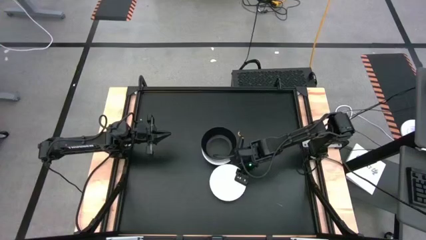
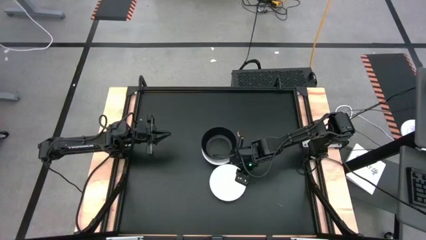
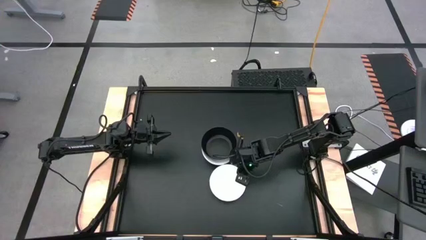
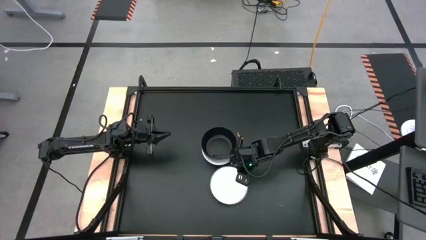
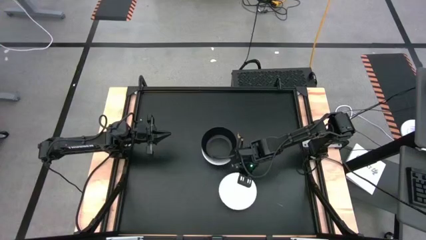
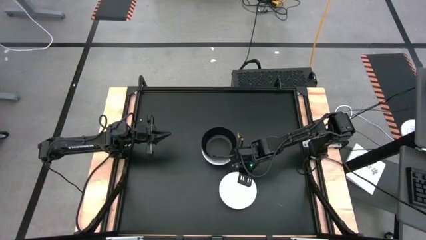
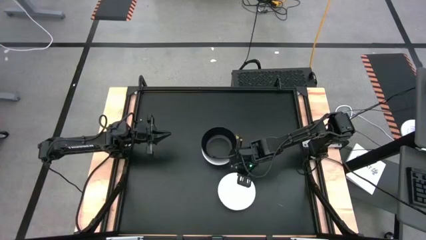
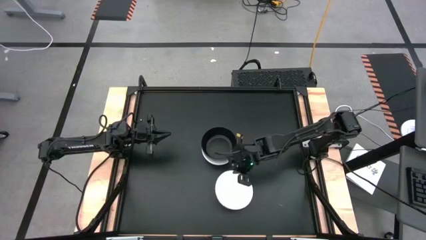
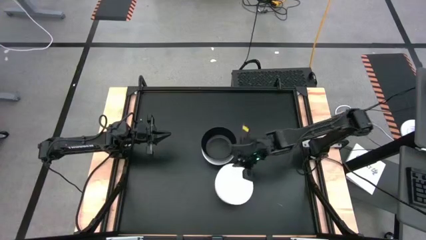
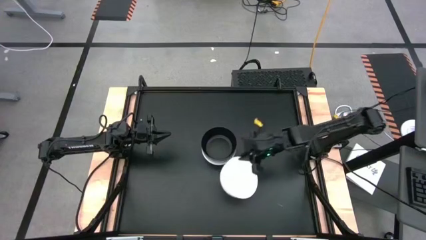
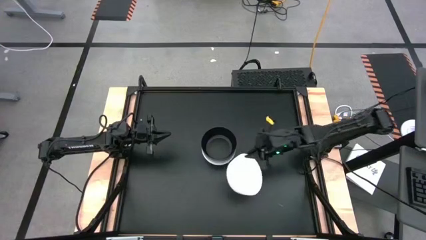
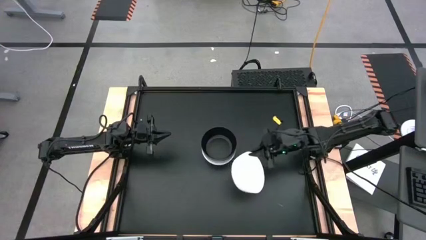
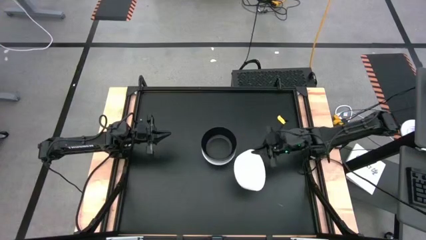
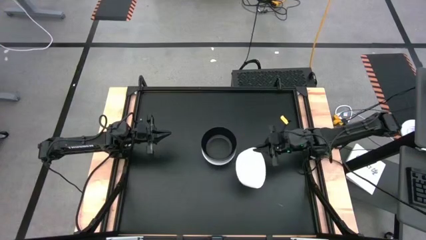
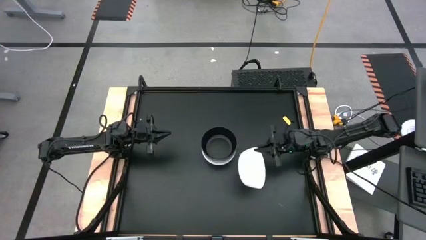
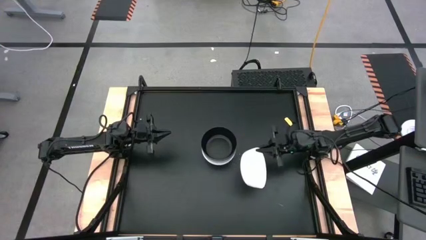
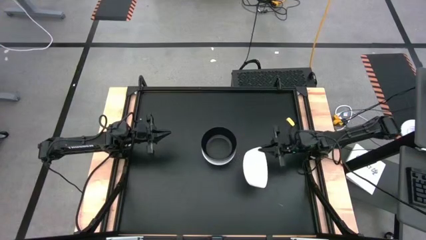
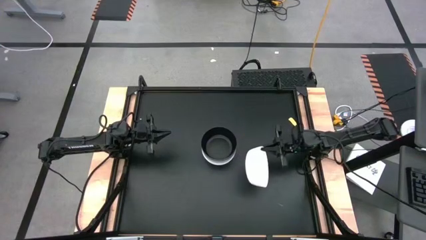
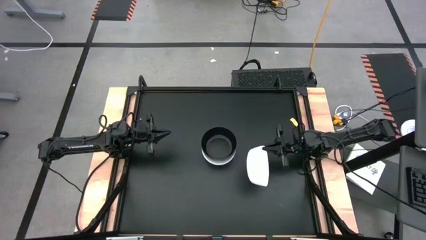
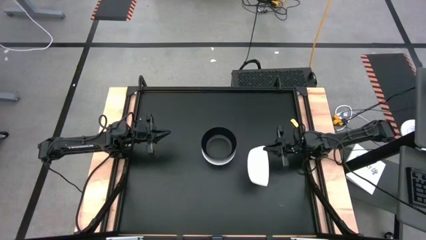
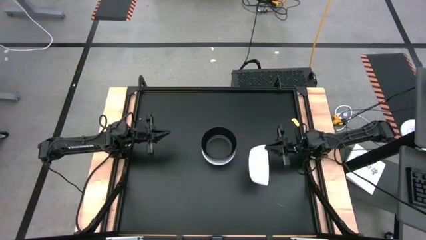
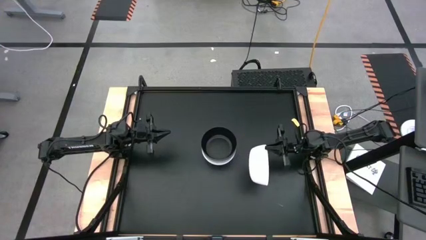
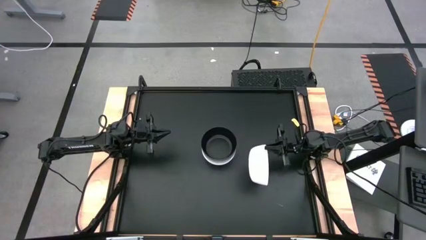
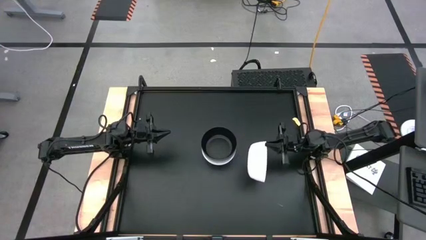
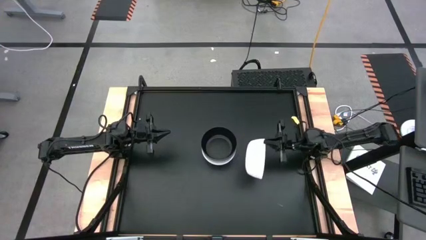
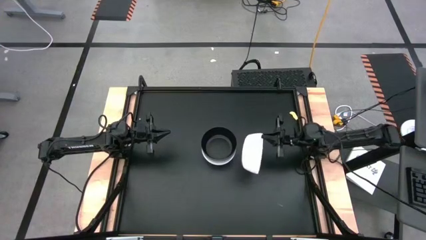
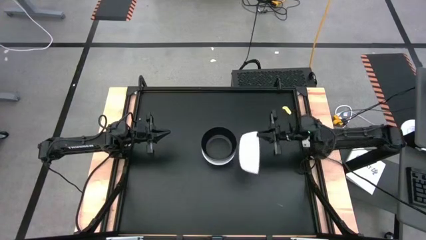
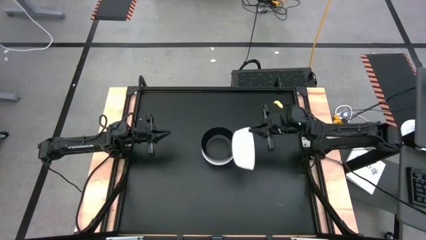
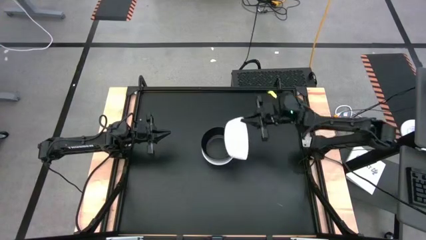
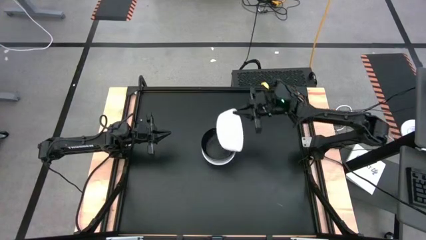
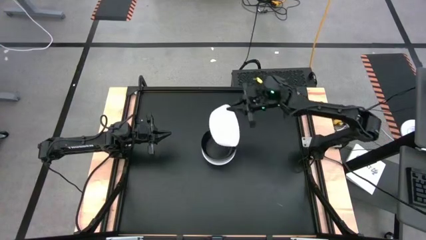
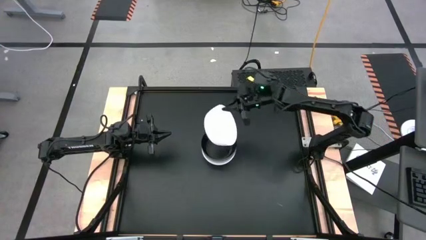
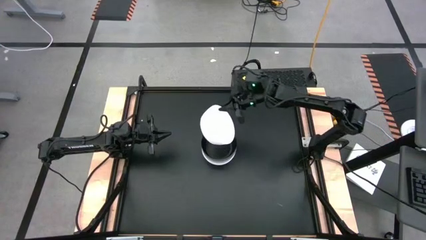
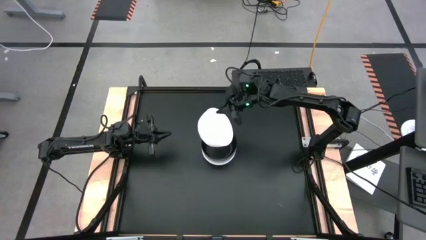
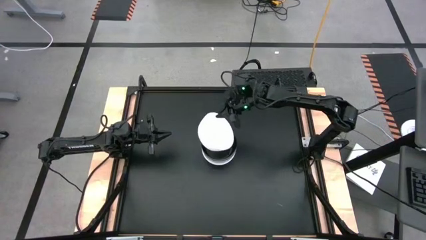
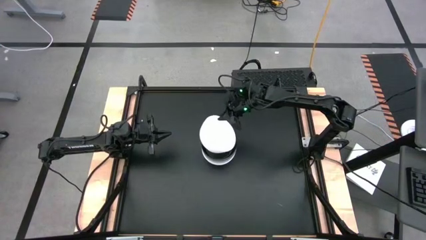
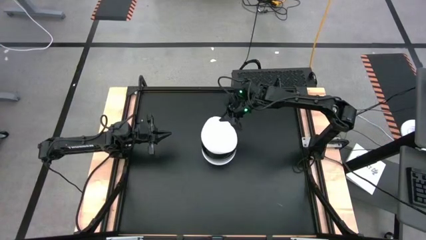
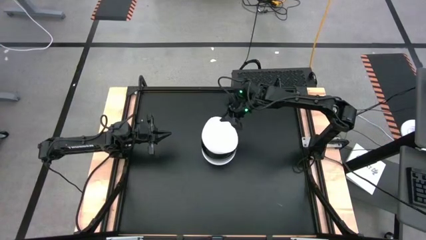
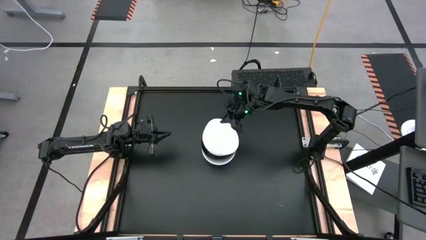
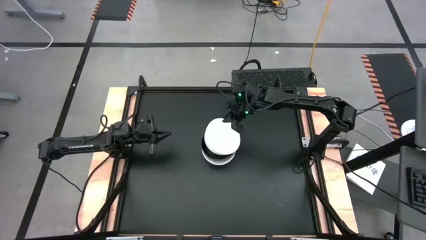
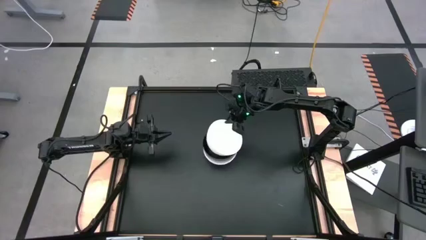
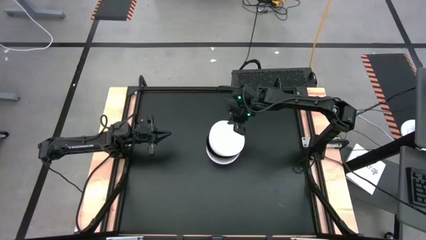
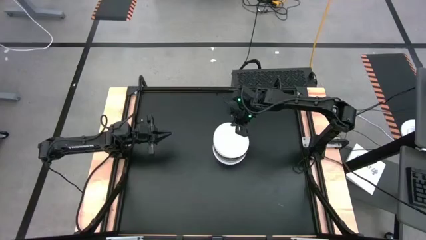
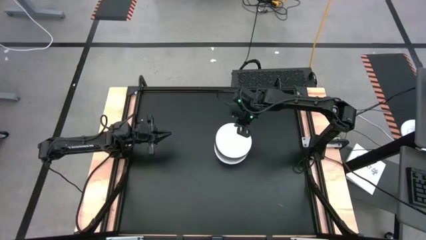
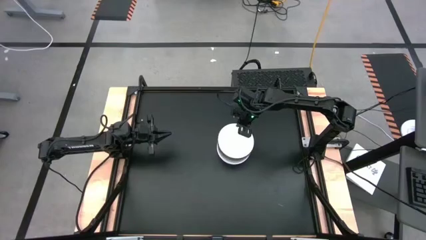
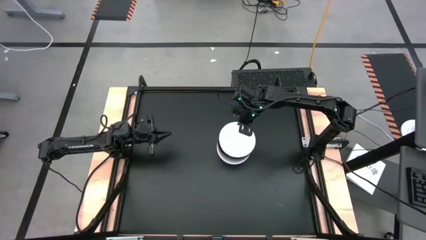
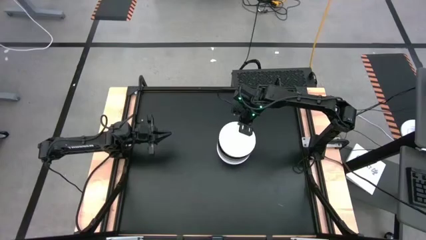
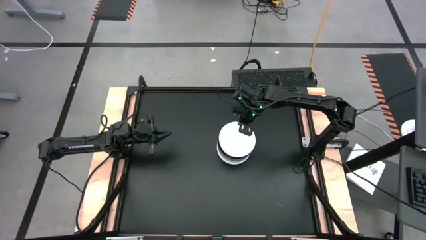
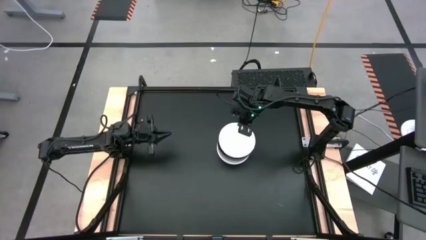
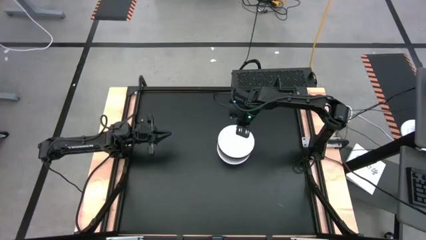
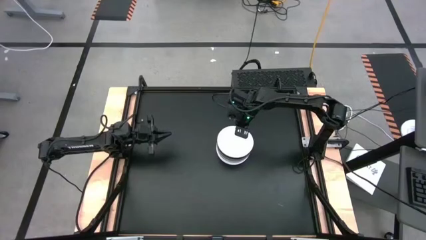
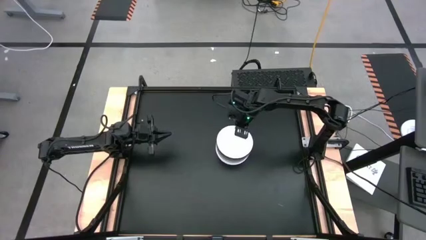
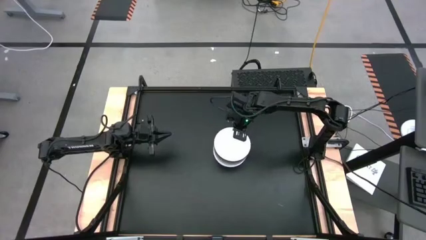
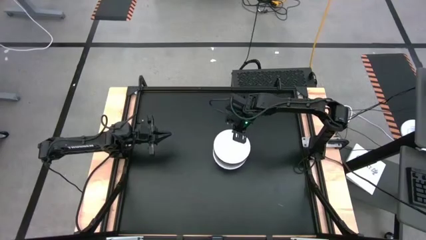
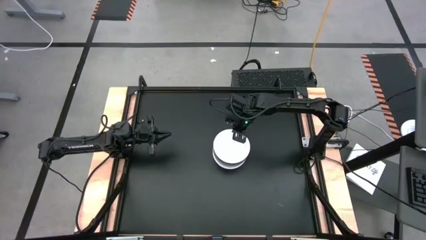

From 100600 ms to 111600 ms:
Task: Nest bowls inside each other
Stack the white bowl on top of the black bowl

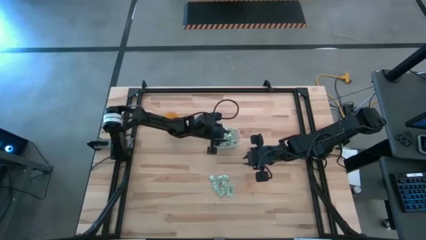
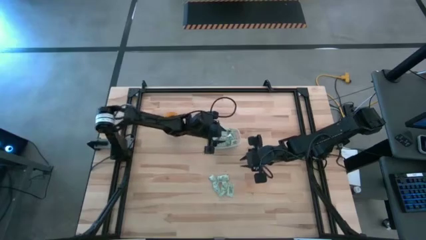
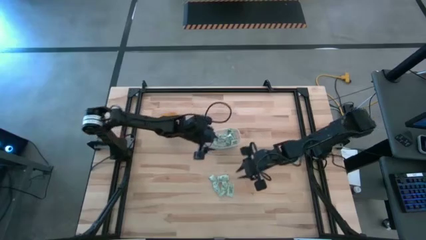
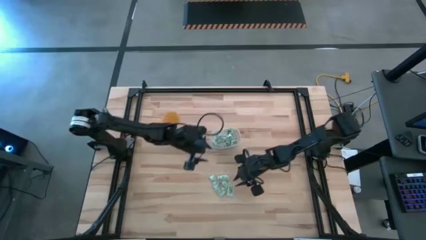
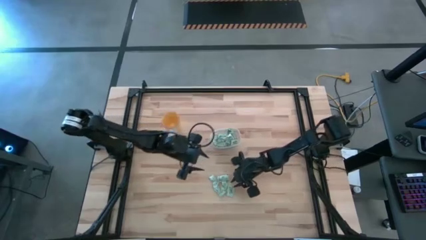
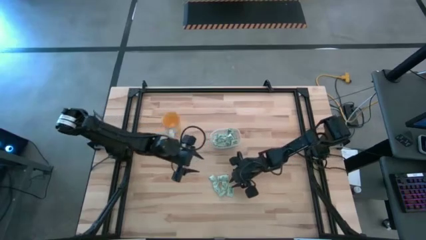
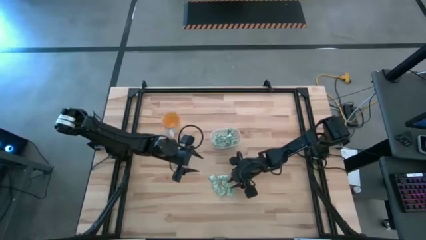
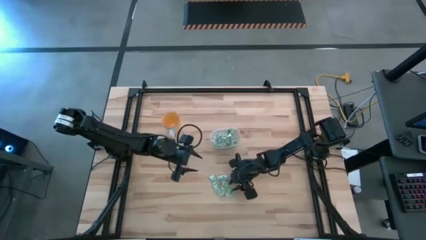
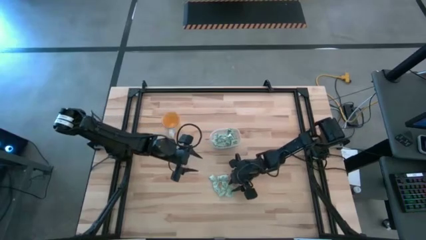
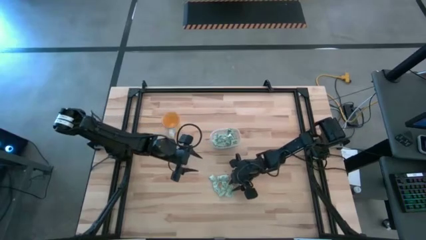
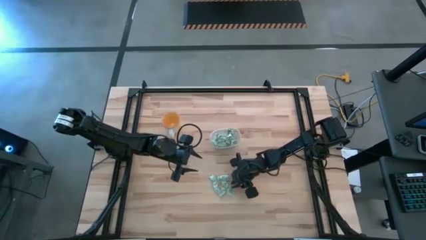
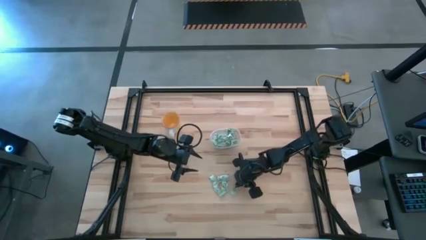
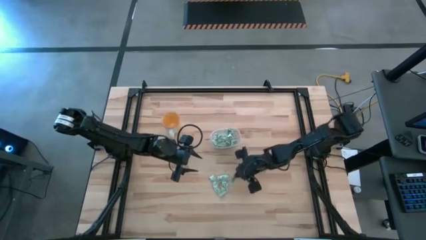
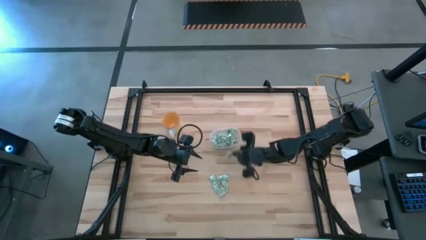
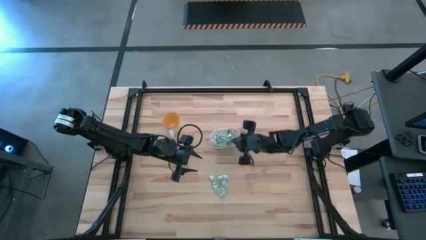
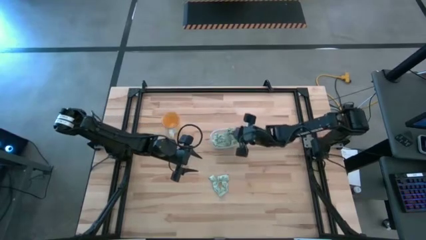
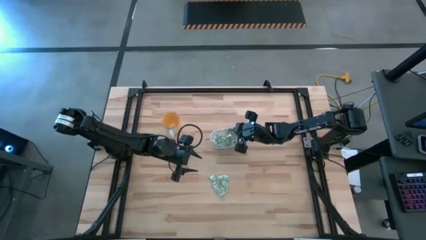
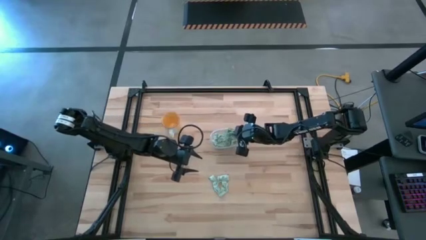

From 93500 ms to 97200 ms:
Task: Pick and place Stevia / Truvia into bins
Put the stevia packet into the transparent bin

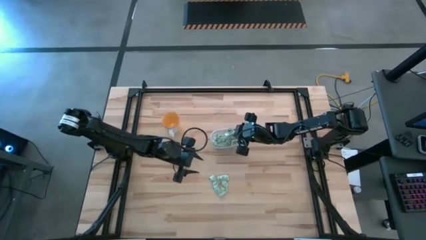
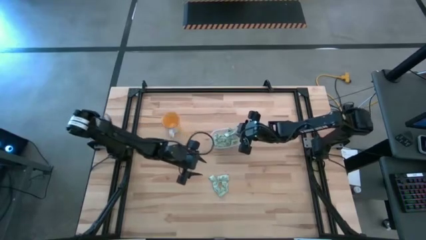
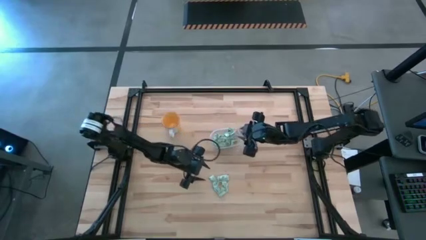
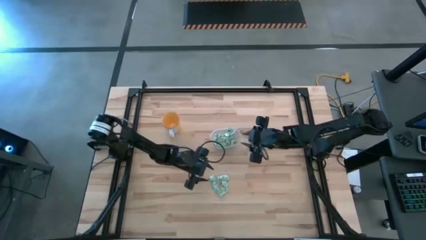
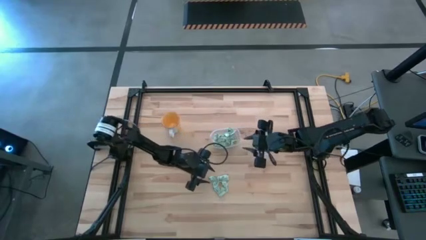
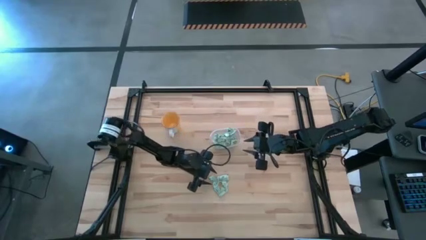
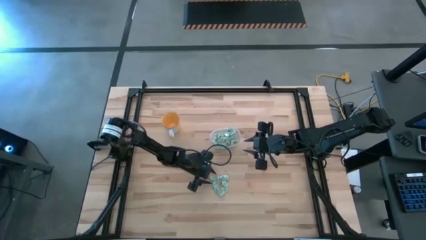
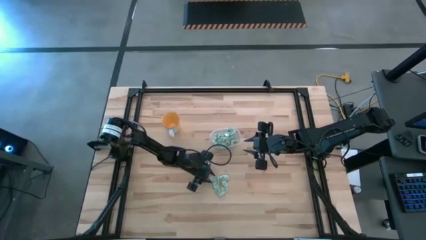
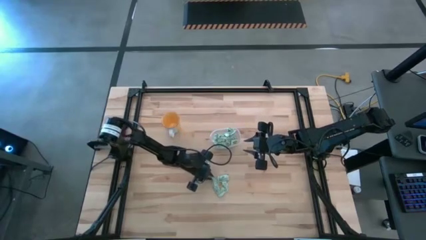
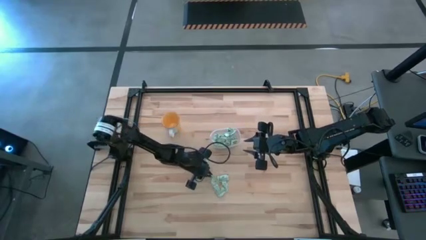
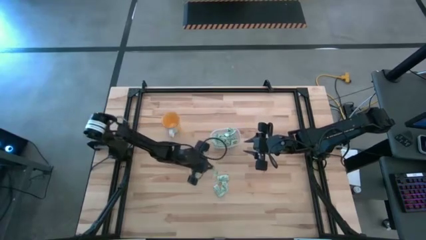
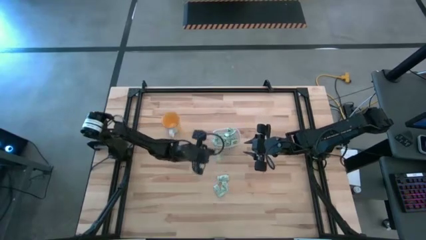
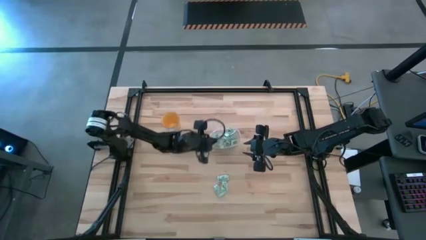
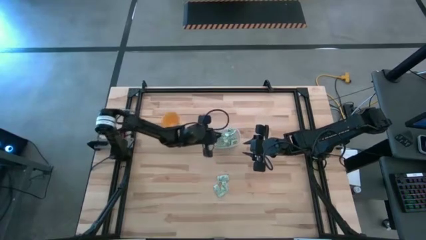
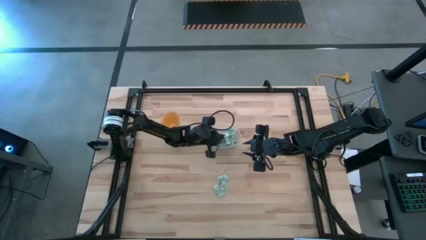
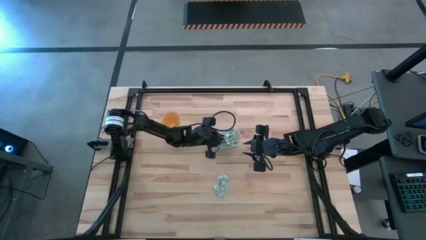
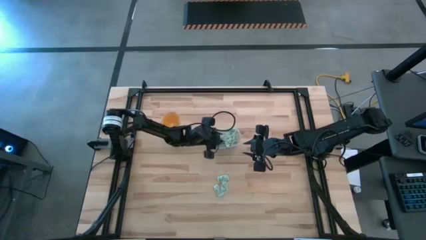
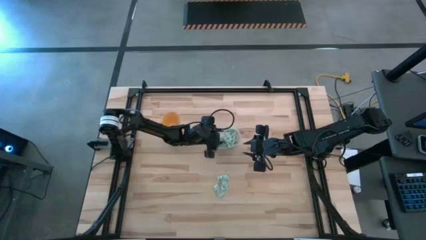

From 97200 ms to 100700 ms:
Put the stevia packet into the transparent bin
